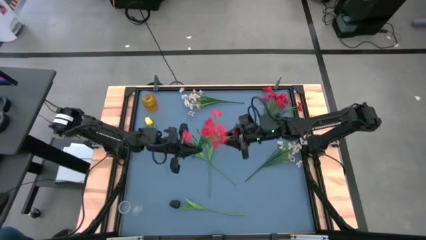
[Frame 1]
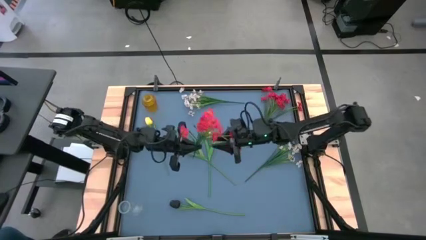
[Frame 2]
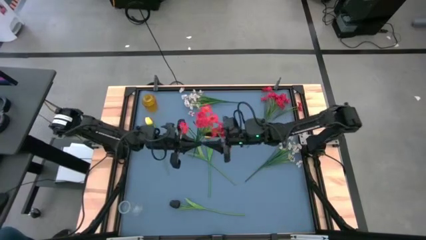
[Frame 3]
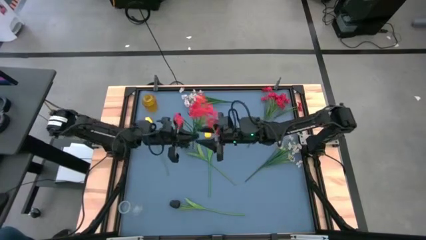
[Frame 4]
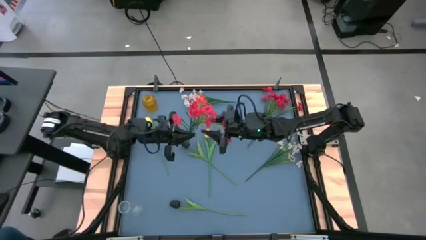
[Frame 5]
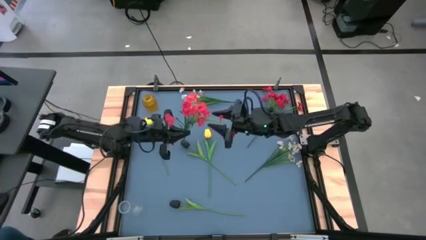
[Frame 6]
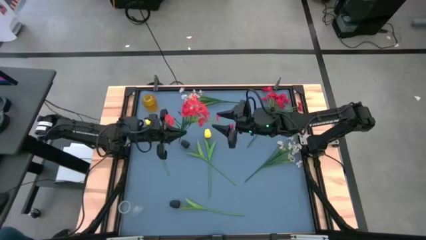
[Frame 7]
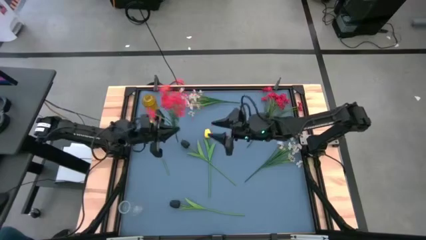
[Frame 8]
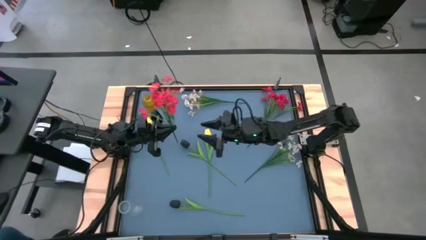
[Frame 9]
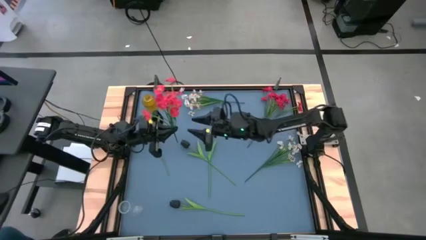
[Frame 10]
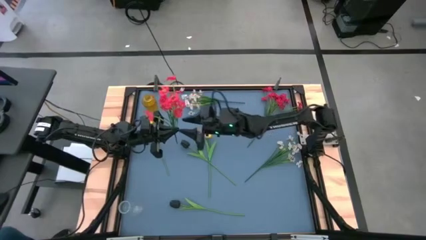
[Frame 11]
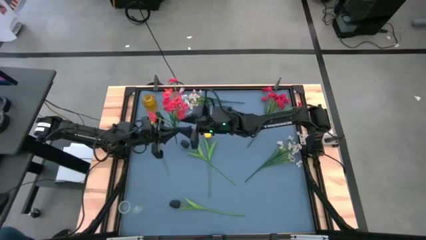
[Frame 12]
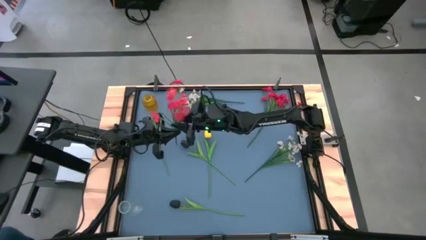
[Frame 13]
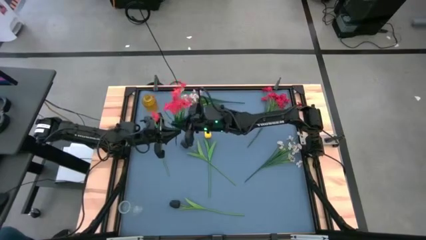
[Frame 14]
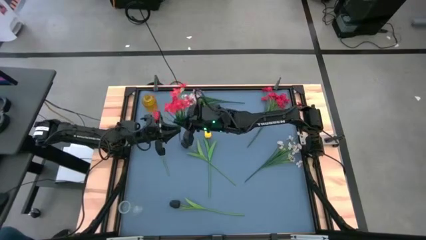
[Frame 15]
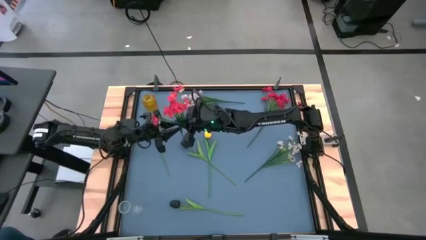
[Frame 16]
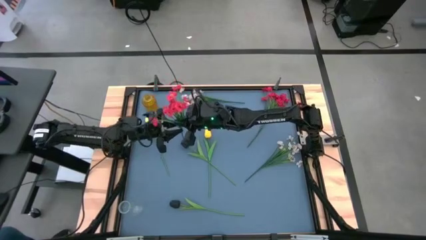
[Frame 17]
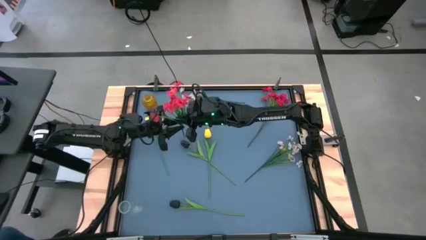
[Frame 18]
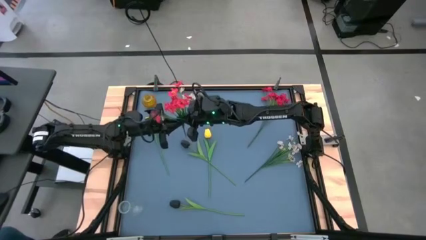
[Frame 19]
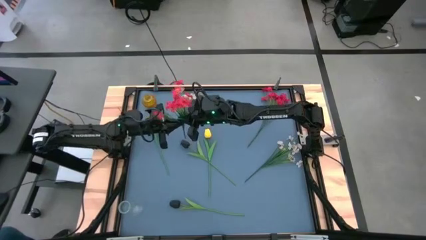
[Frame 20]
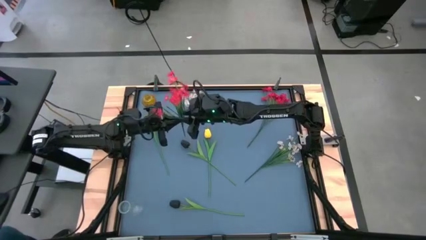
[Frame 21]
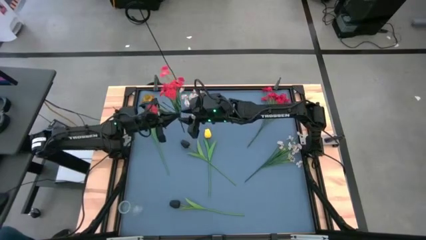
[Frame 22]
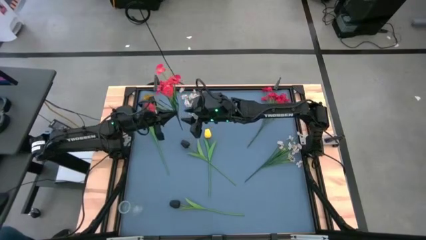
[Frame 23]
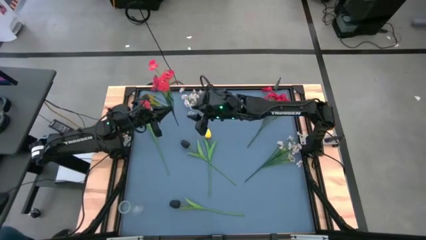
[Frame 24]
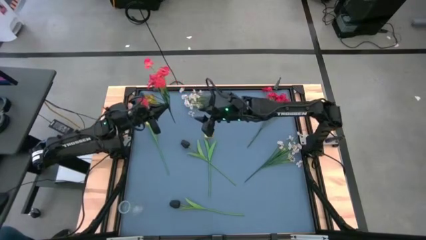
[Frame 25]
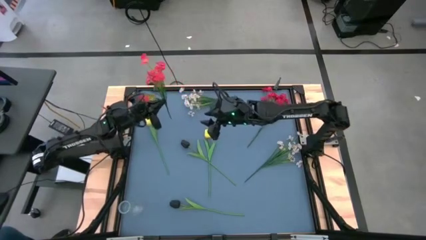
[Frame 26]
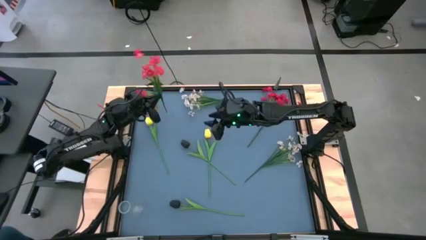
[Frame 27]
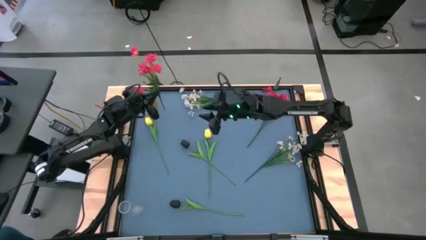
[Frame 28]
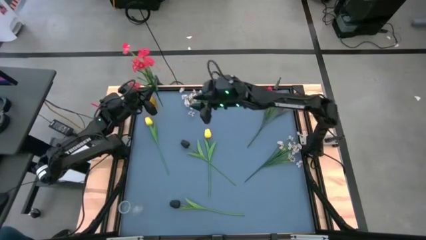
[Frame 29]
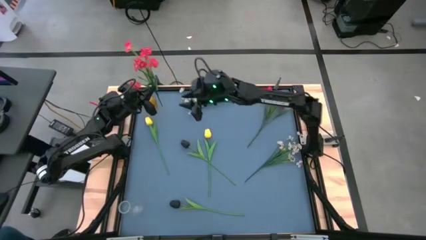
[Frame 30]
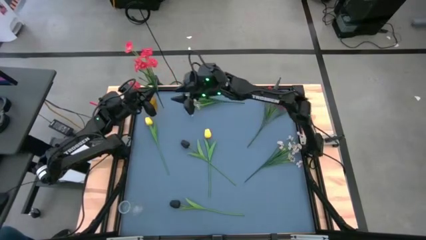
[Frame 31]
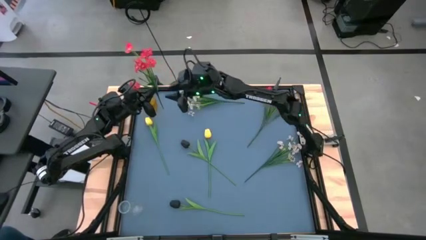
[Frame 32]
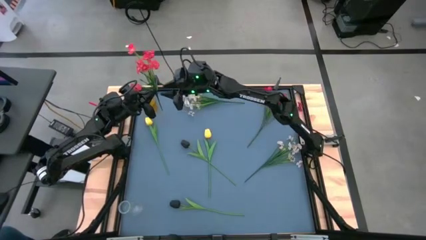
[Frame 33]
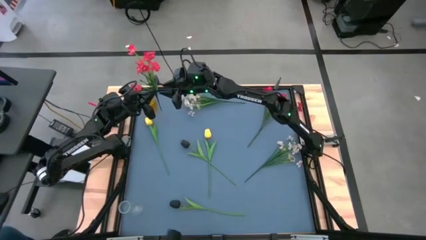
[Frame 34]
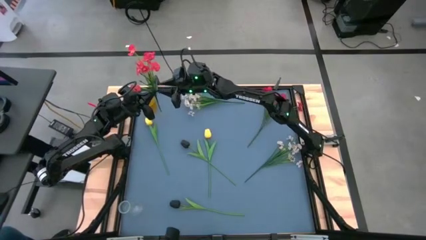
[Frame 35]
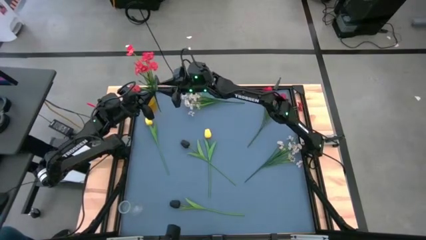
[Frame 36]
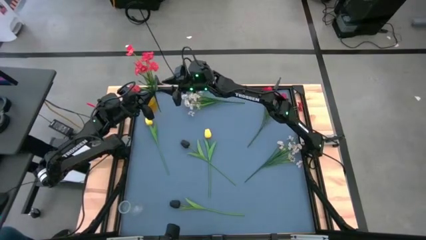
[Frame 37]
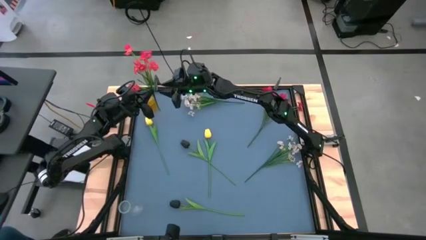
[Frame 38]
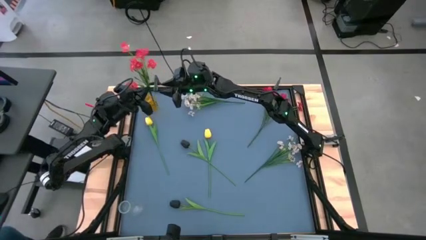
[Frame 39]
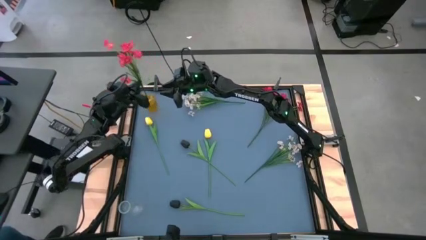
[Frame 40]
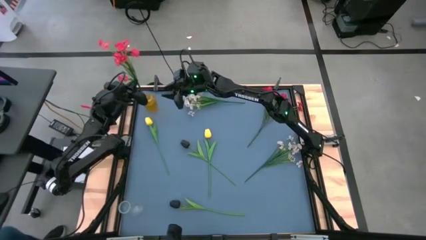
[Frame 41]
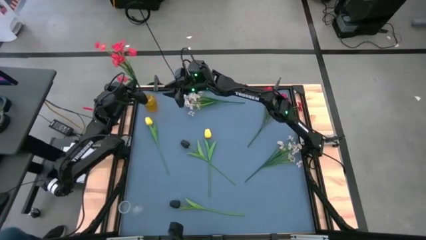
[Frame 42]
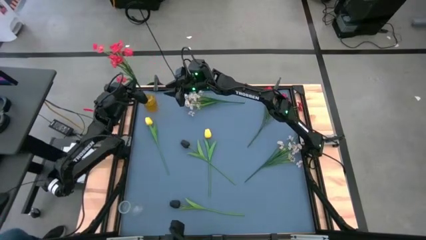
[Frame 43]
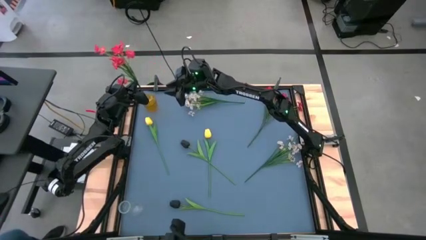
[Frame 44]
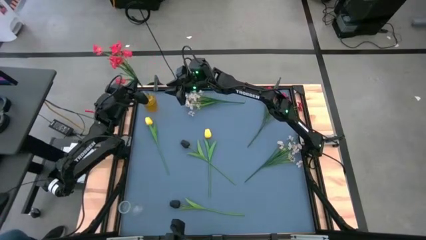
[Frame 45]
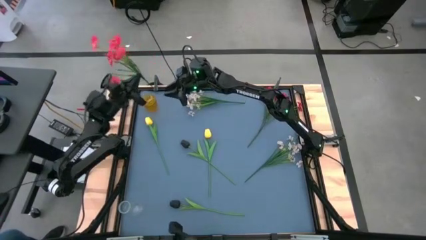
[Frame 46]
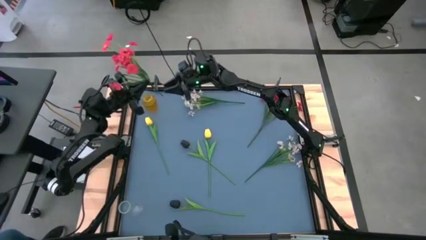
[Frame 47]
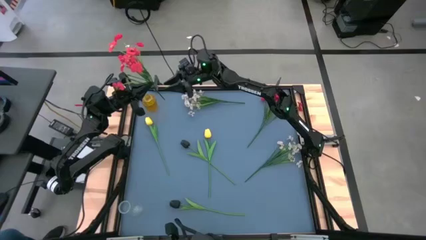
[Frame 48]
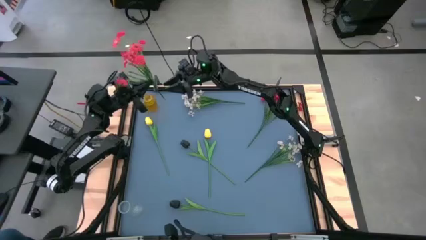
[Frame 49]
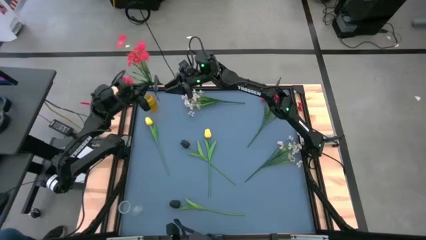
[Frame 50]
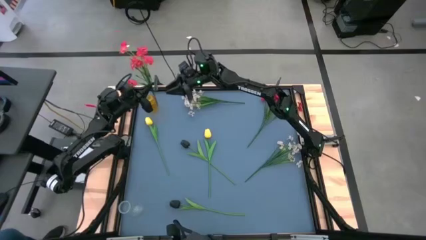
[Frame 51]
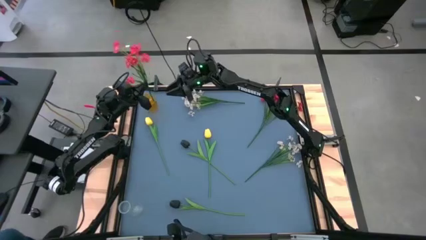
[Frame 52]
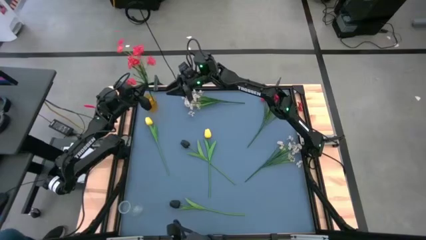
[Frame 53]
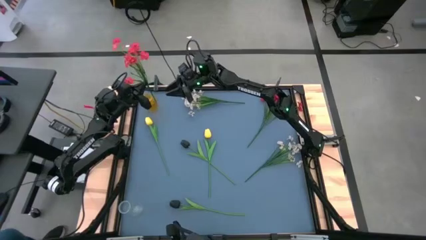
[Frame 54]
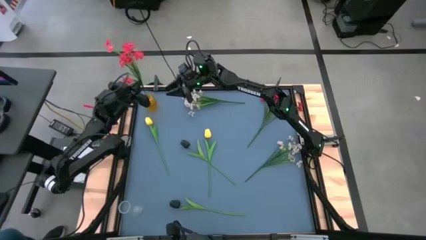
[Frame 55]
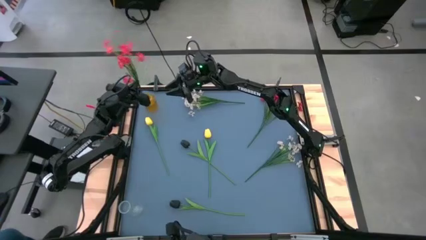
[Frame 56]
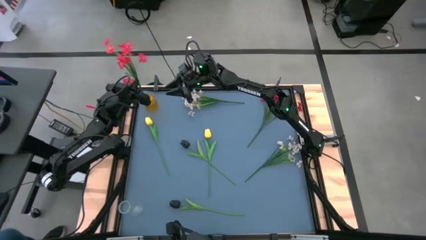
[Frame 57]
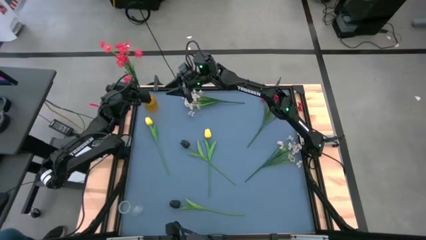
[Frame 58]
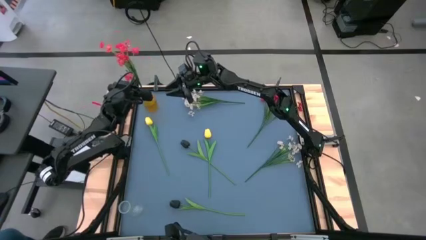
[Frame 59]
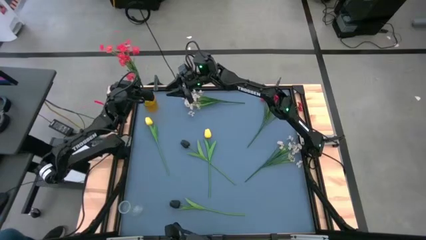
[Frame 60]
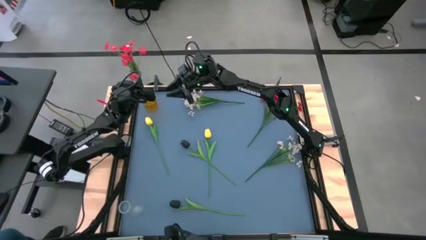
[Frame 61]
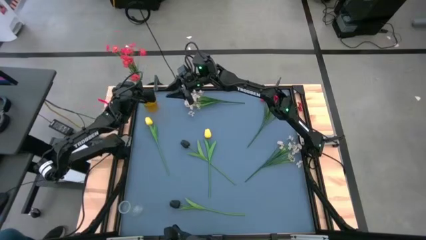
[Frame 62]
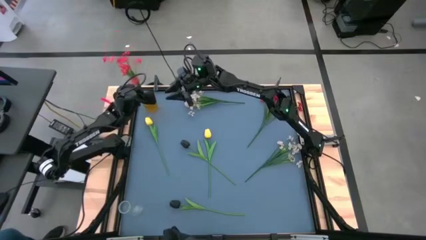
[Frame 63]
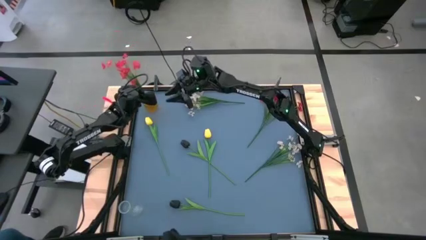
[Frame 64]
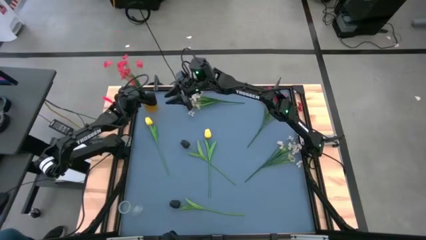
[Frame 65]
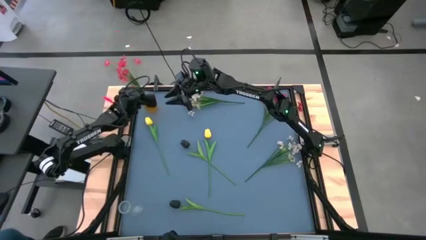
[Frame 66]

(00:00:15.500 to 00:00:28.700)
Task: Sort flowers into vase by color
Put the bottom red flowers into the yellow vase
